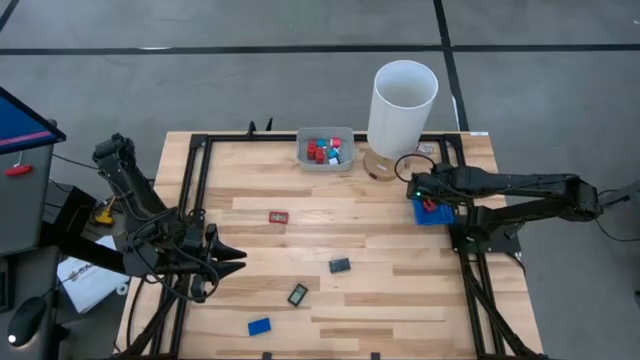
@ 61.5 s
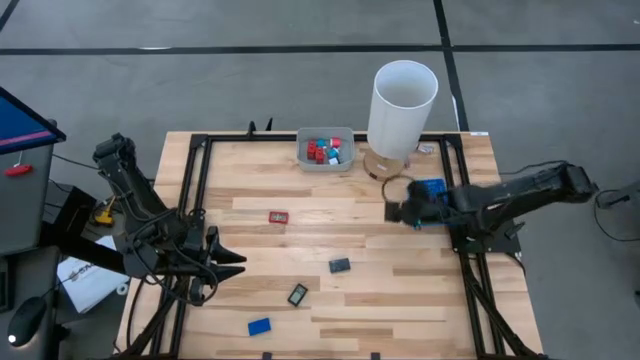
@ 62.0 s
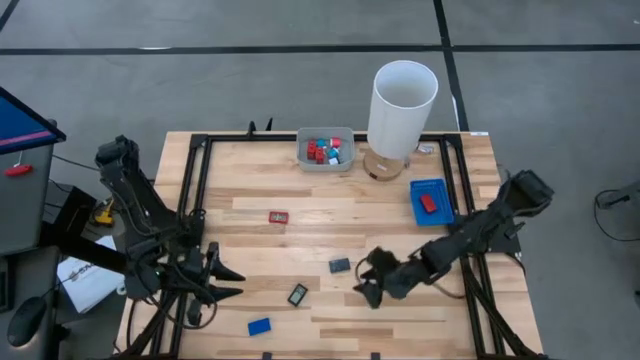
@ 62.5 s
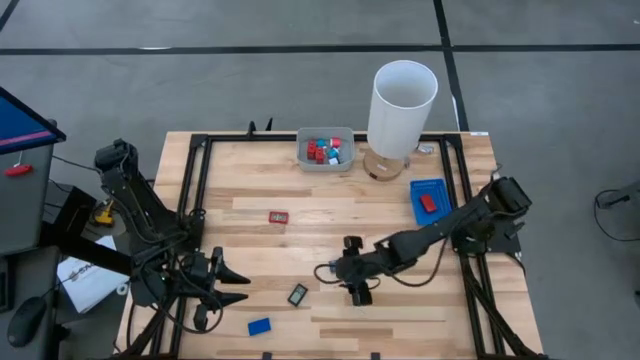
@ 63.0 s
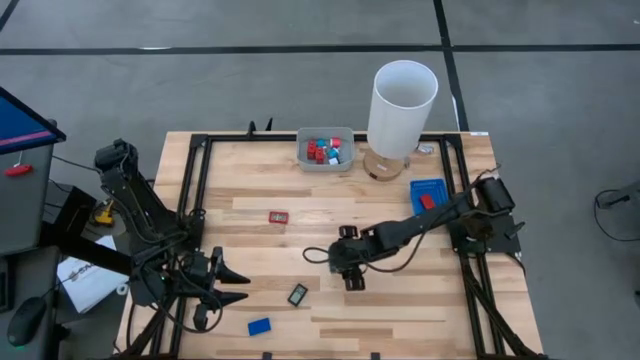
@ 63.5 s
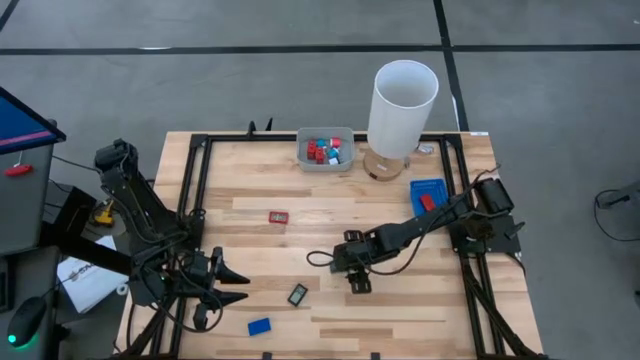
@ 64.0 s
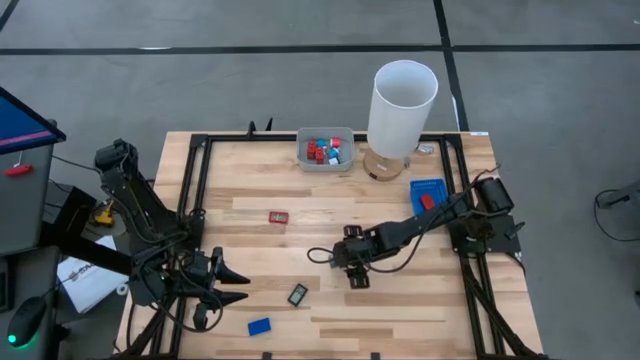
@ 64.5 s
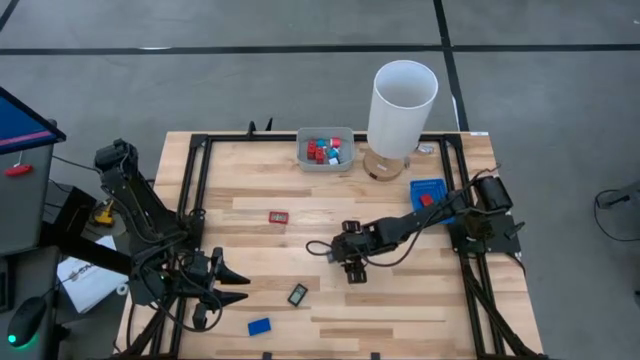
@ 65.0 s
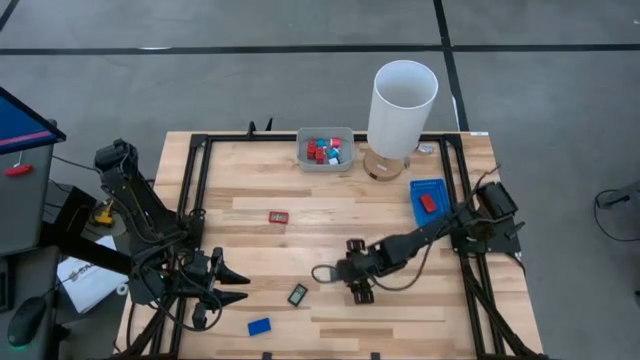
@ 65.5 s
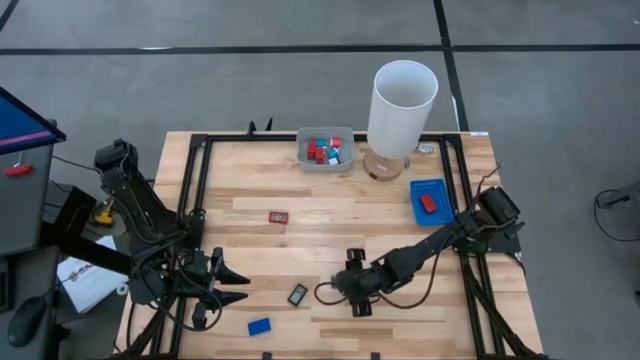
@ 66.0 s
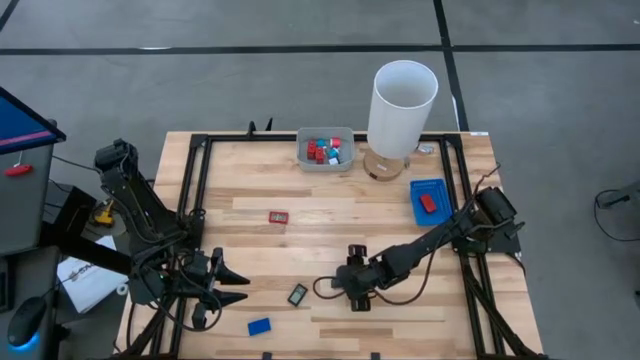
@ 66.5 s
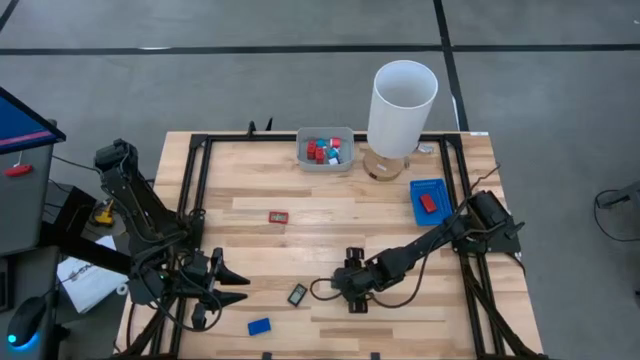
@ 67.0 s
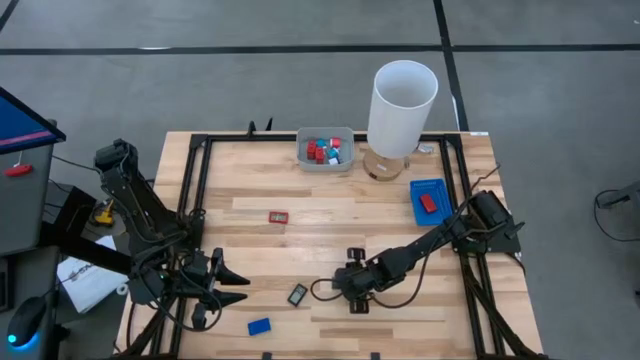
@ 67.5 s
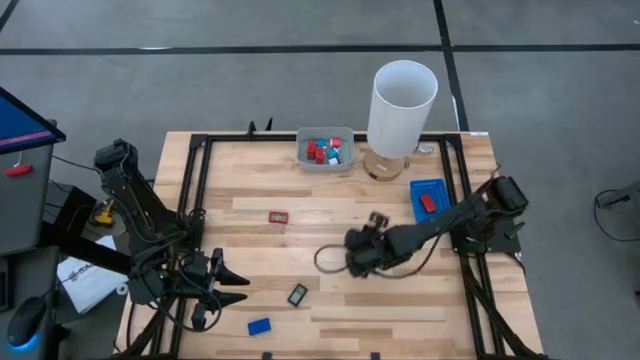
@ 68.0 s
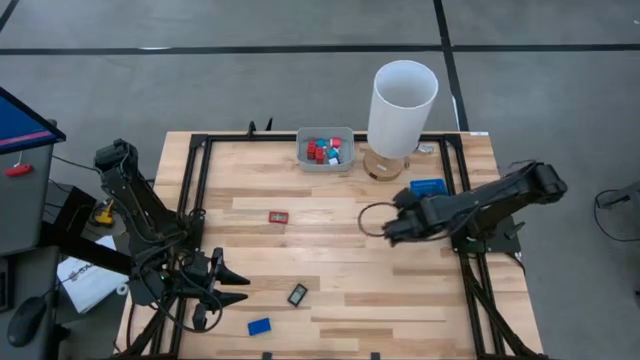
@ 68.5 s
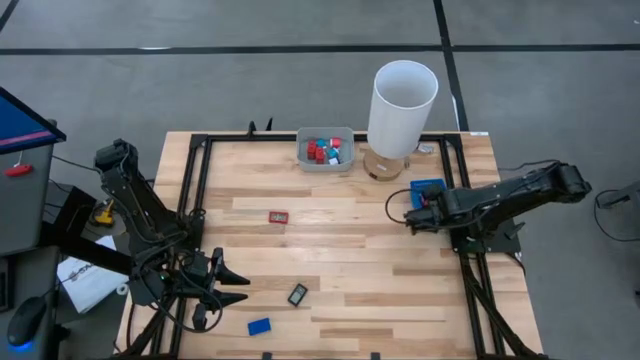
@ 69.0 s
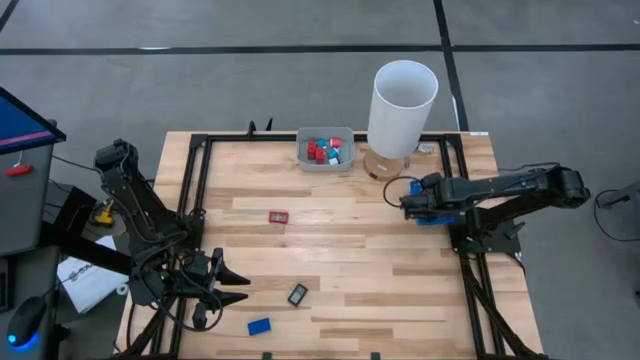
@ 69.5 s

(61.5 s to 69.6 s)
Task: Pick & Place Office items
Put the top black digital clock into the blue basket

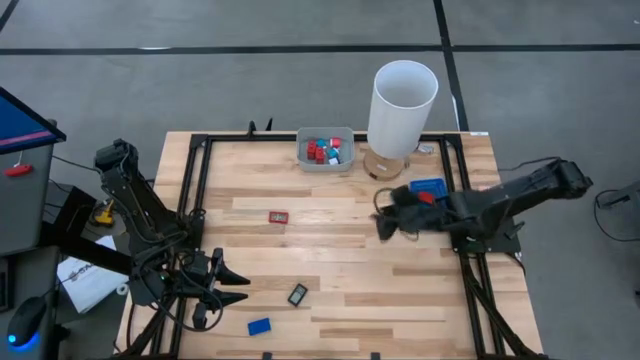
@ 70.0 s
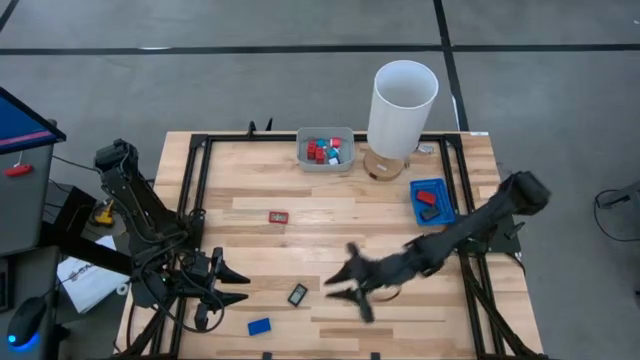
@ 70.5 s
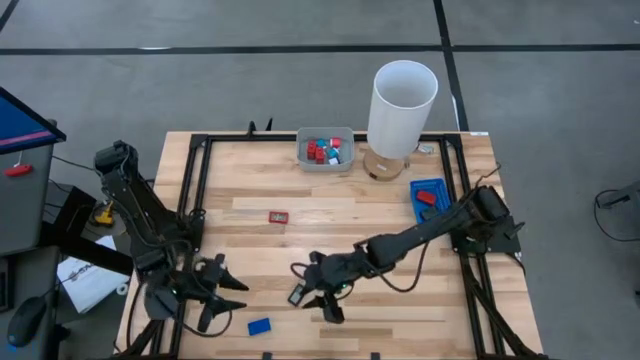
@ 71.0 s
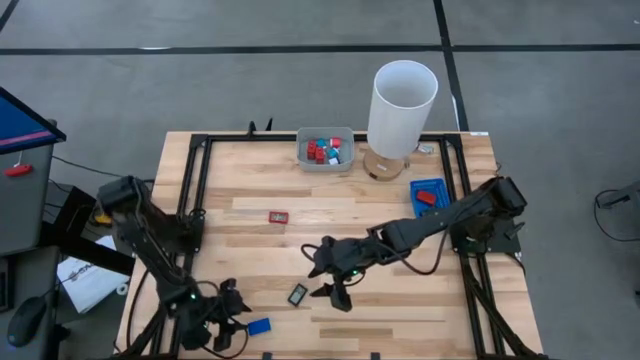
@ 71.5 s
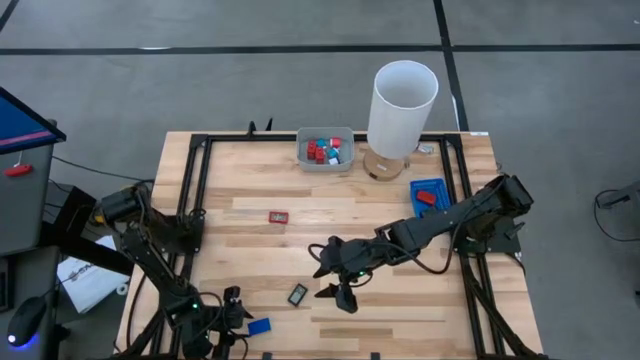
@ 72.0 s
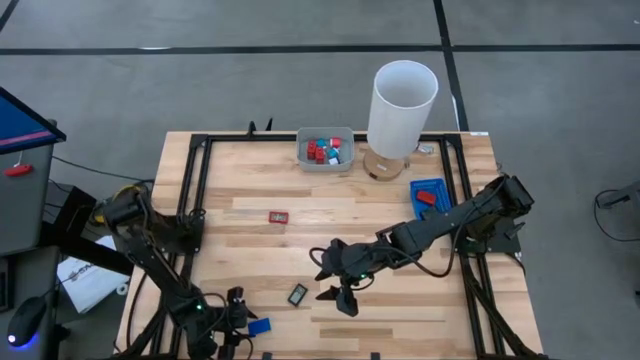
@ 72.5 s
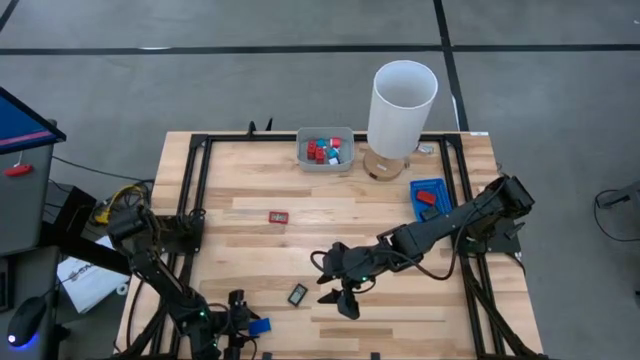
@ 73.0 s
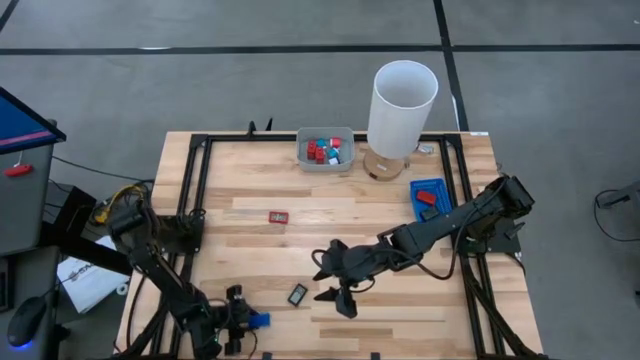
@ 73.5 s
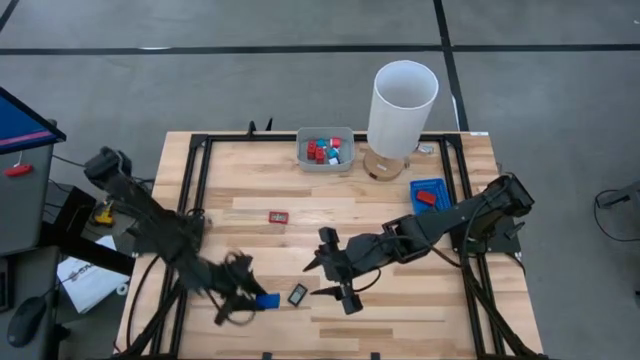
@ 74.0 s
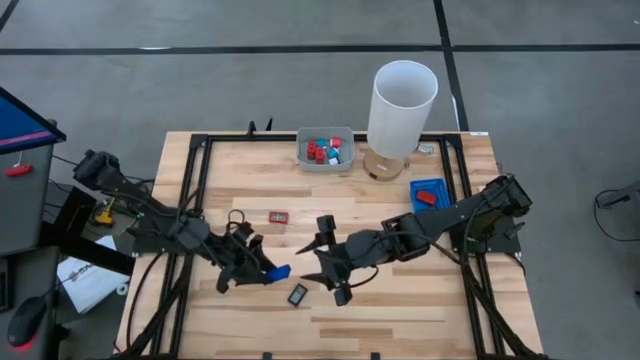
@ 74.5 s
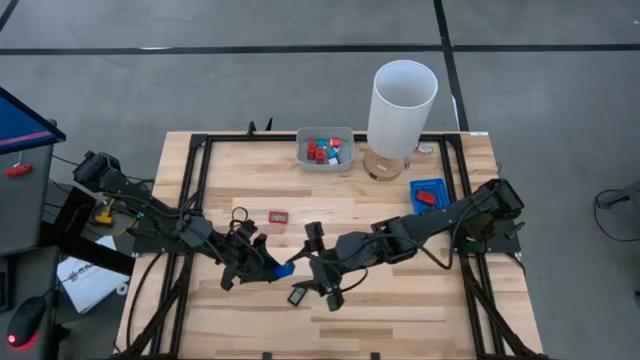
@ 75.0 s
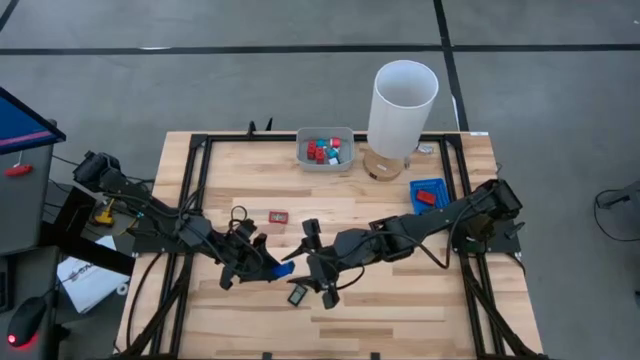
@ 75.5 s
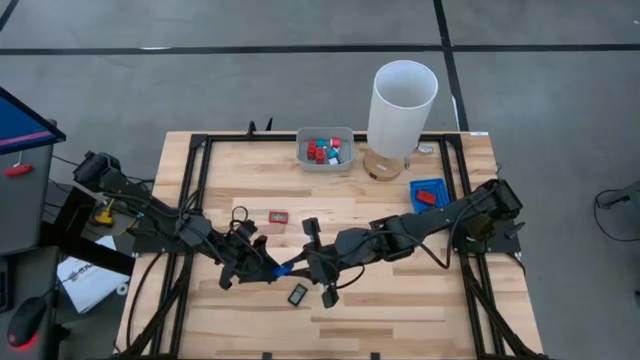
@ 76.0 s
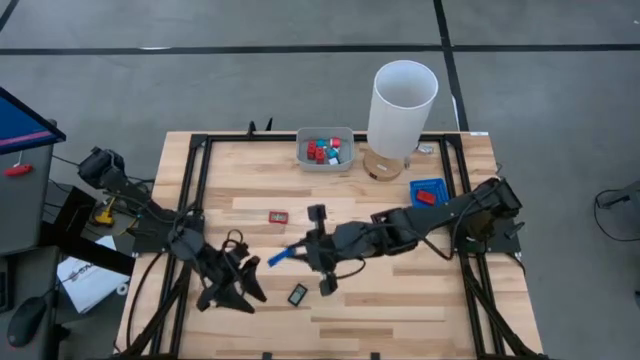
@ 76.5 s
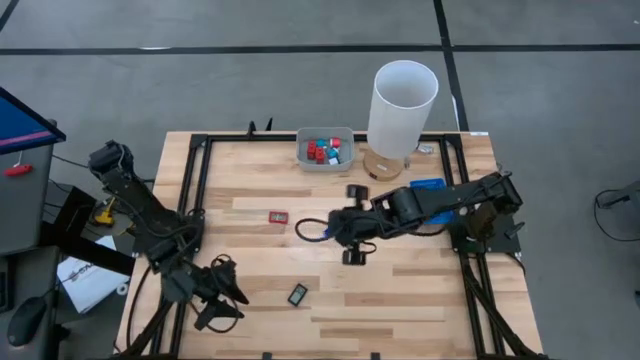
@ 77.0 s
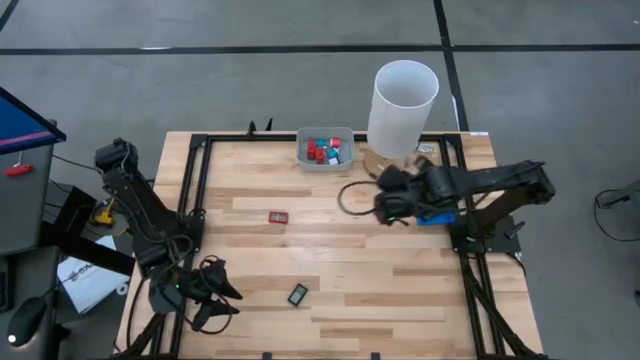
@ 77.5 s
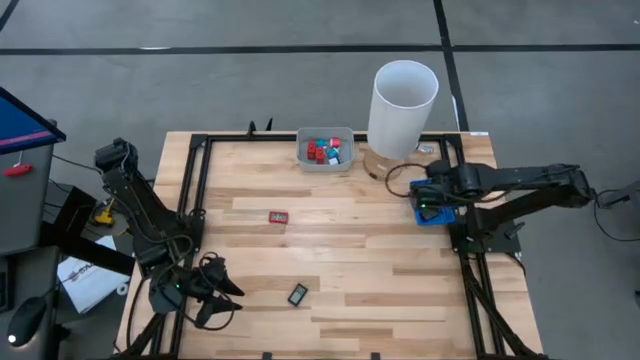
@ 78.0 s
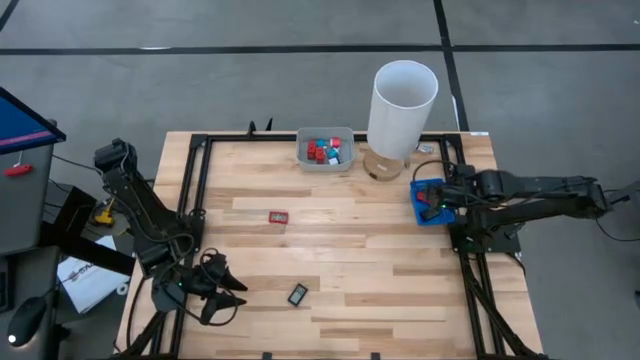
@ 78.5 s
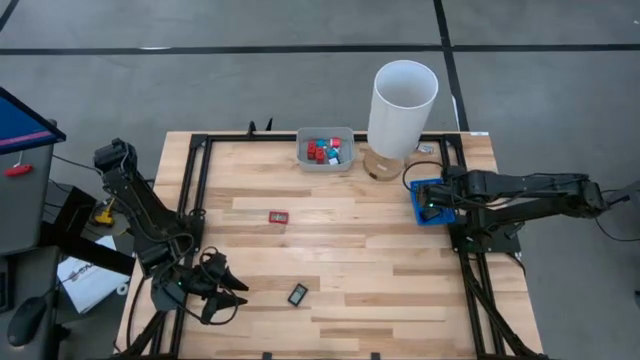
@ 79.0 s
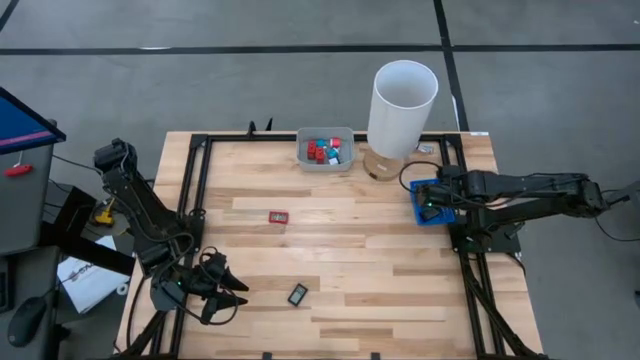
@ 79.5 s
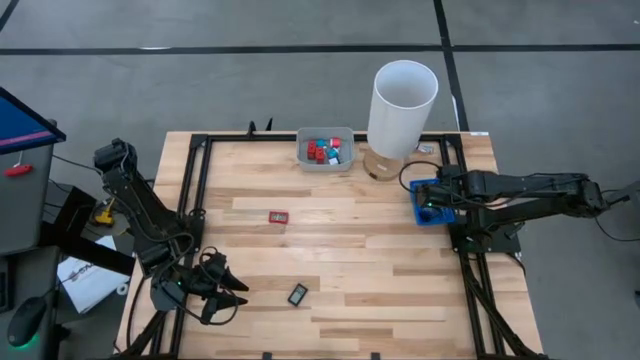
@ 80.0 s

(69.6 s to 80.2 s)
Put the blue digital clock into the blue basket
